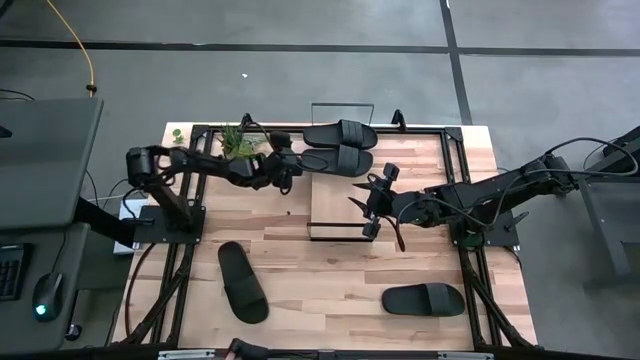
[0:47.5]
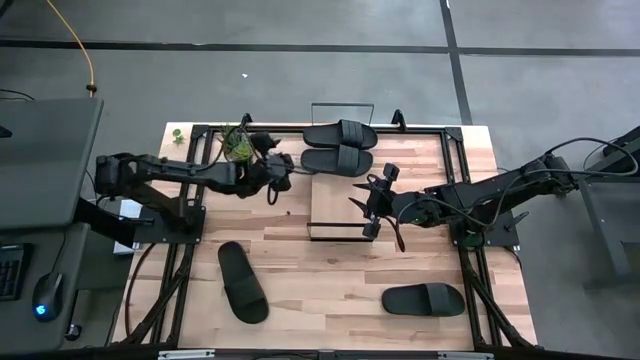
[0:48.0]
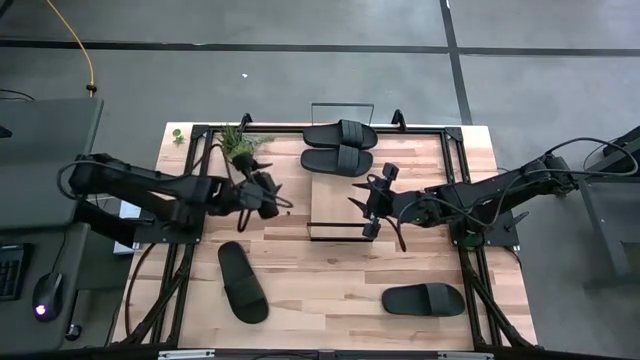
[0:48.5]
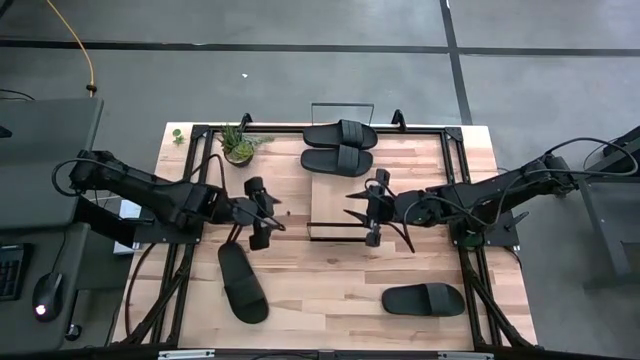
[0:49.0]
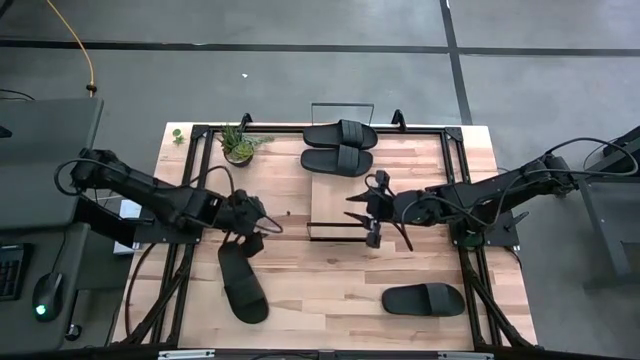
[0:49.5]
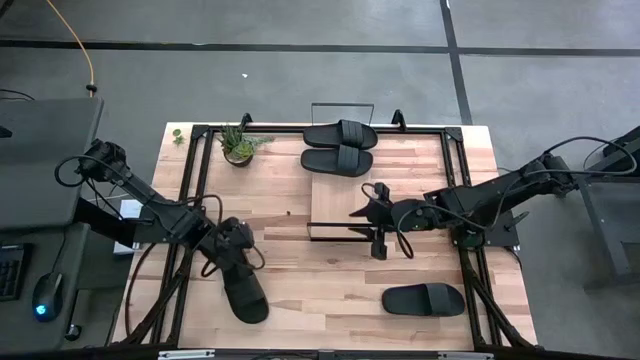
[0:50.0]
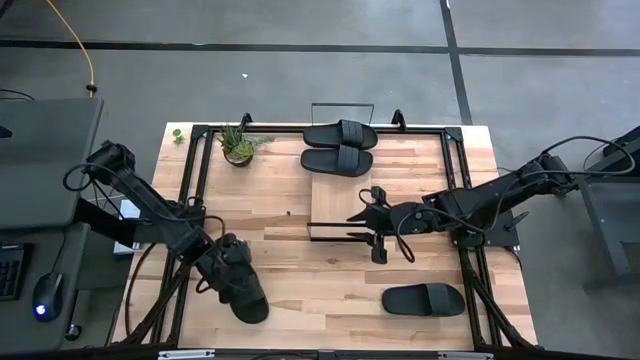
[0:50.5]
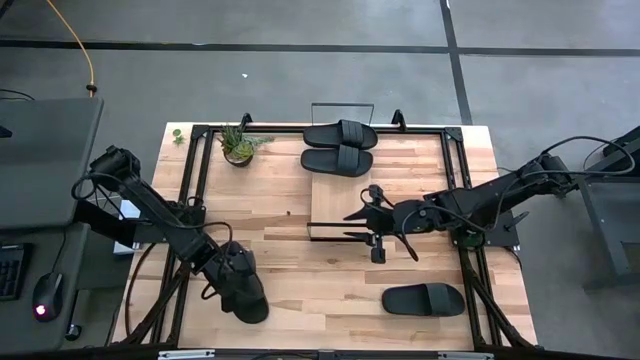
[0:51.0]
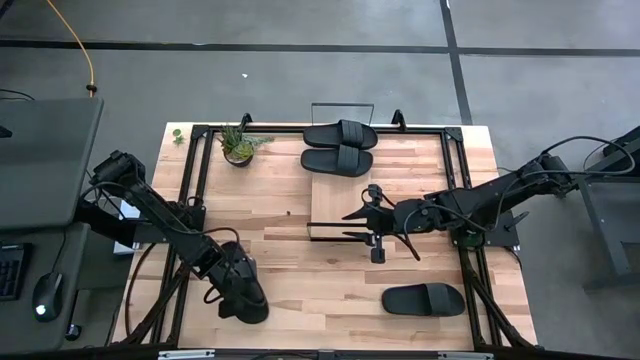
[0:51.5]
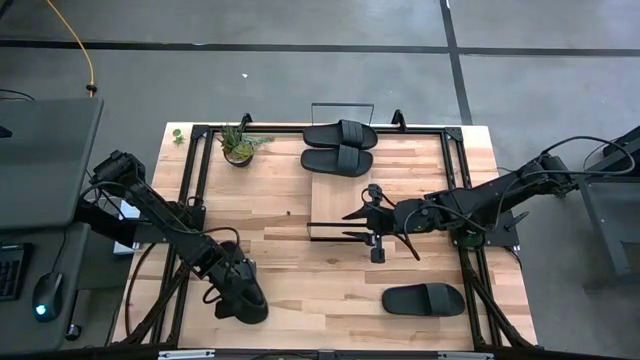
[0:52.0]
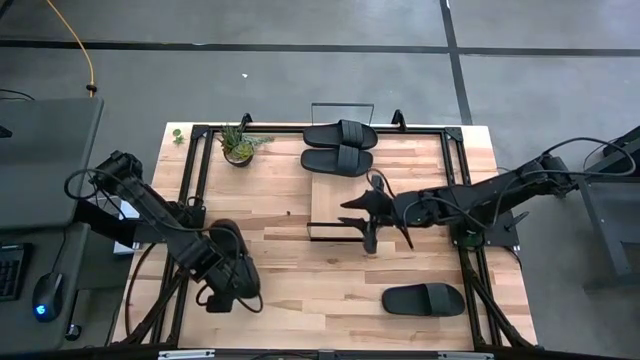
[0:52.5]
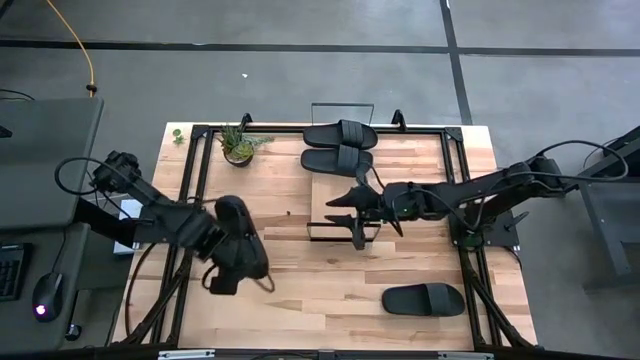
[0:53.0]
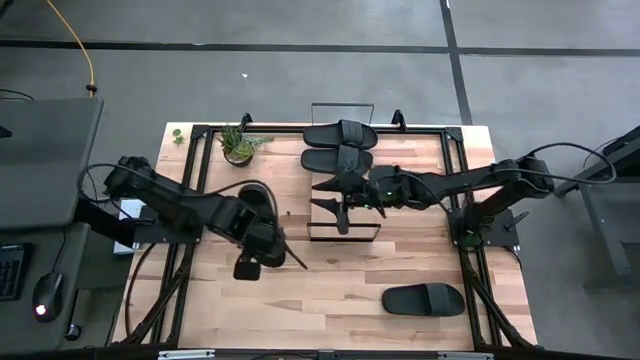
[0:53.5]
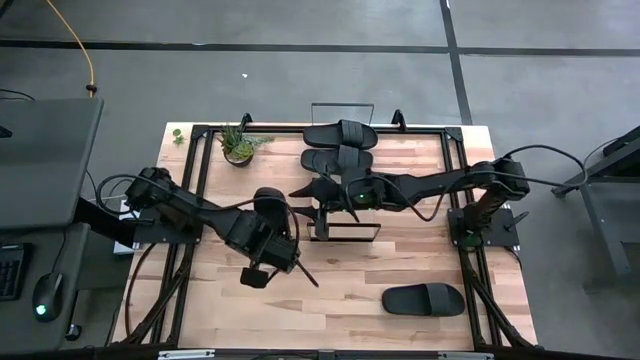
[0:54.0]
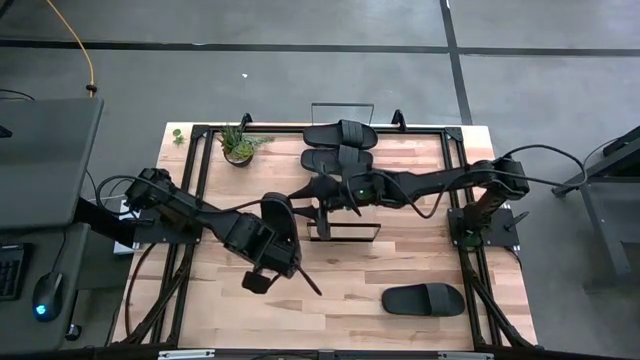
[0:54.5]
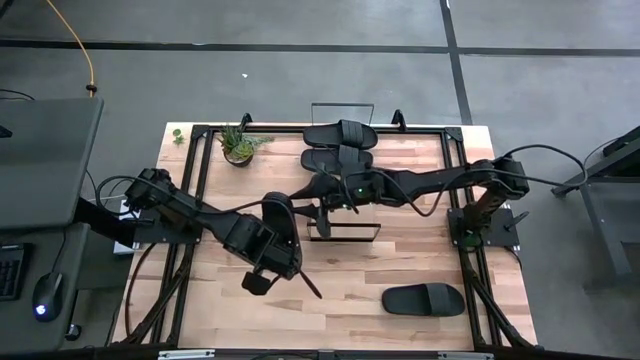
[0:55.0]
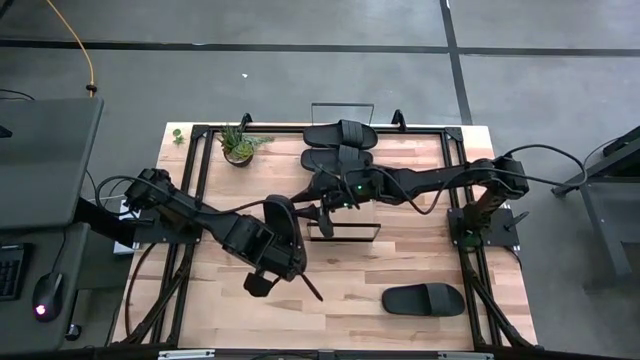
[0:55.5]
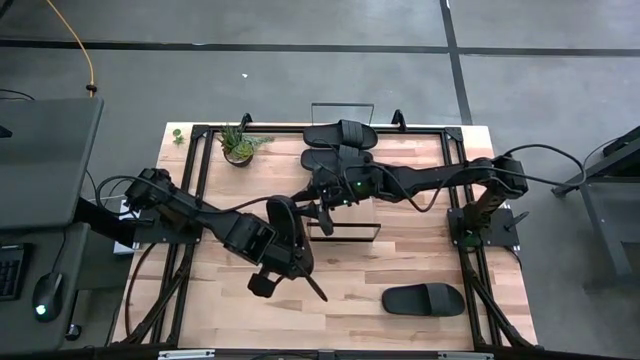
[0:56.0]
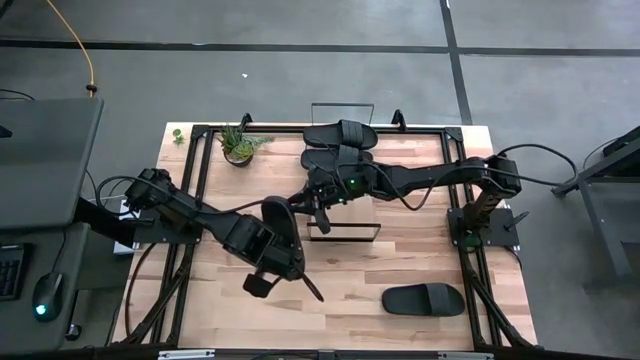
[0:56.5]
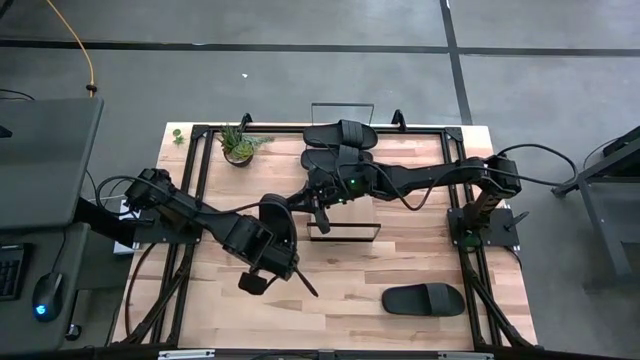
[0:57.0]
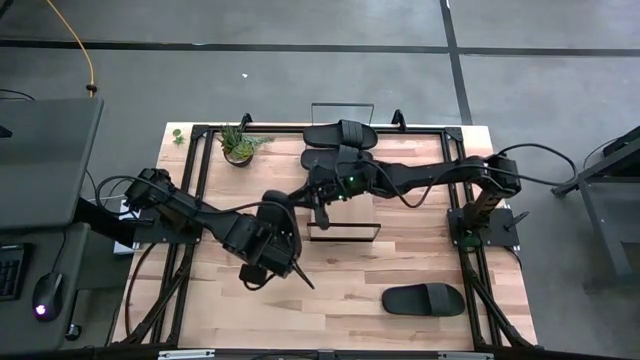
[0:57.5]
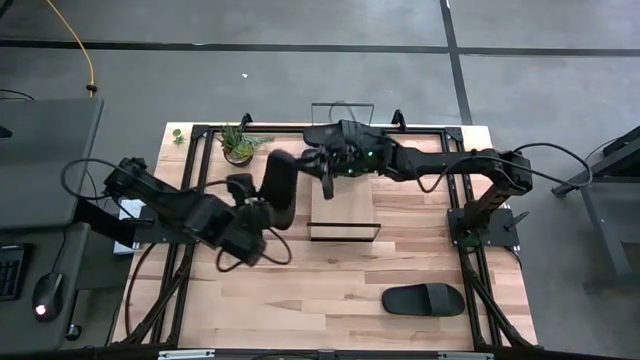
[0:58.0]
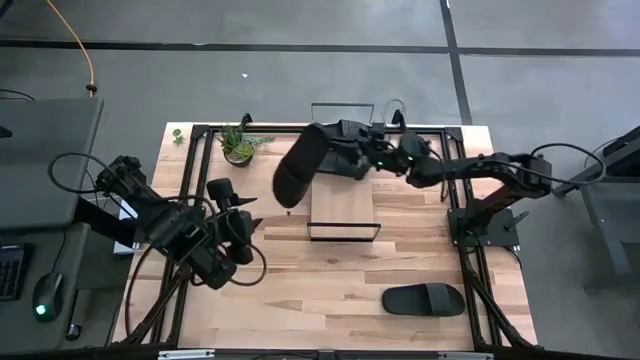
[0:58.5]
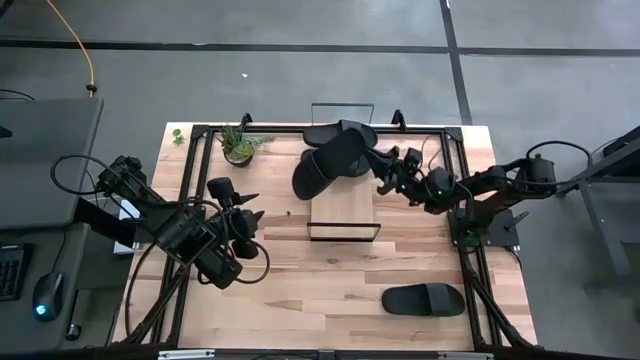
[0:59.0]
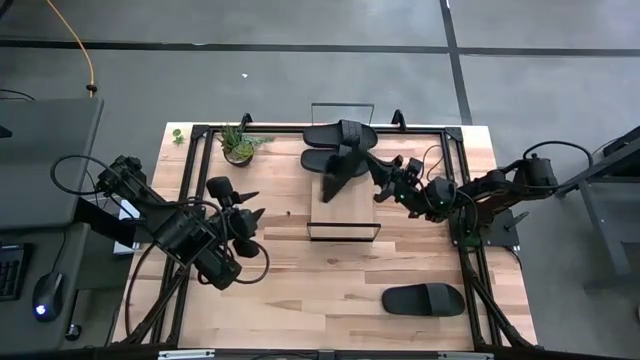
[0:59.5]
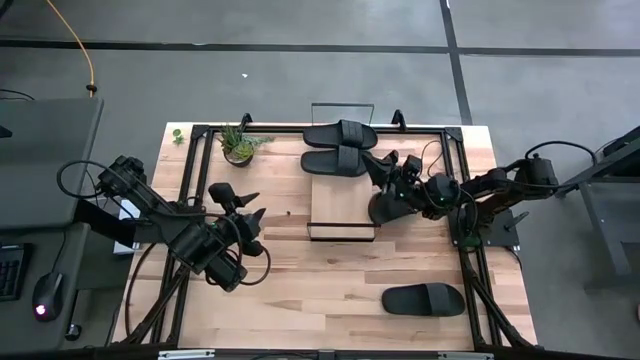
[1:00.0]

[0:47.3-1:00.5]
Task: Pick and place slides into the shelf
Put the left black slide on the shelf

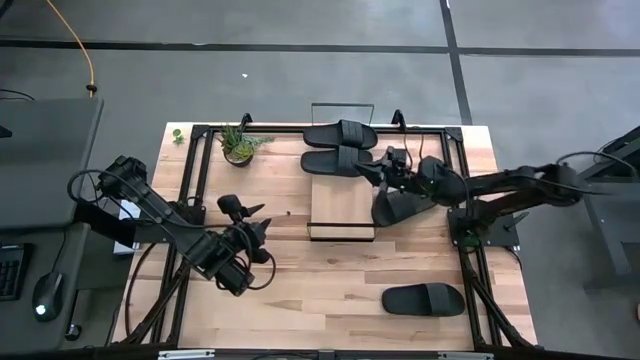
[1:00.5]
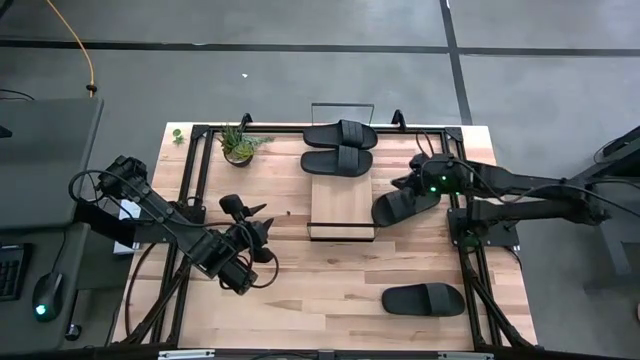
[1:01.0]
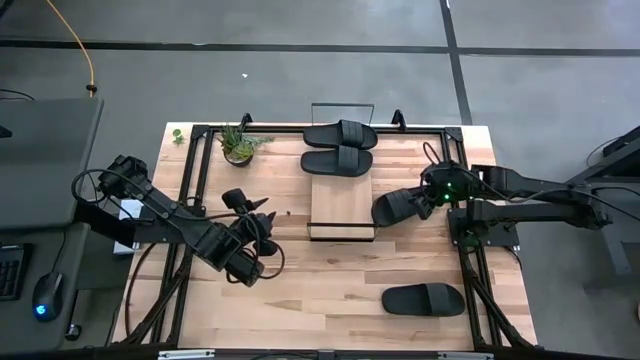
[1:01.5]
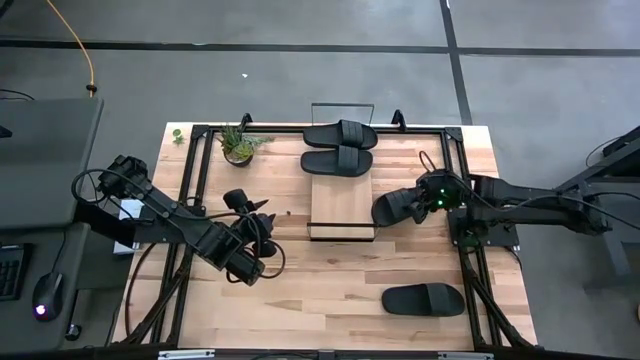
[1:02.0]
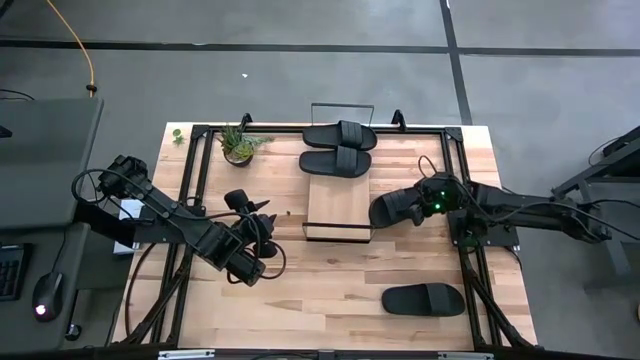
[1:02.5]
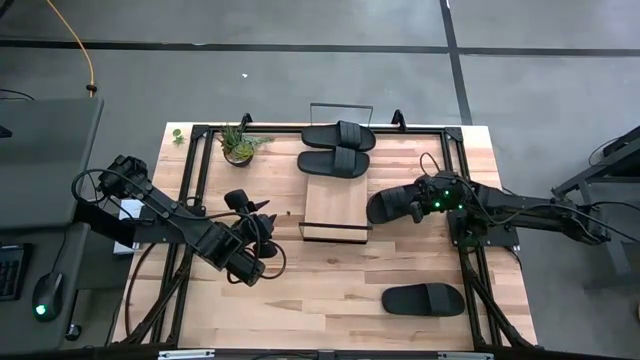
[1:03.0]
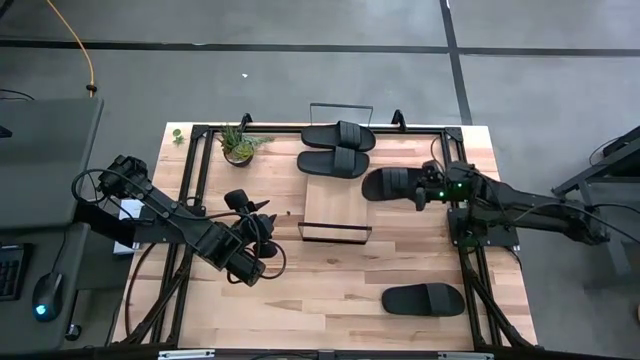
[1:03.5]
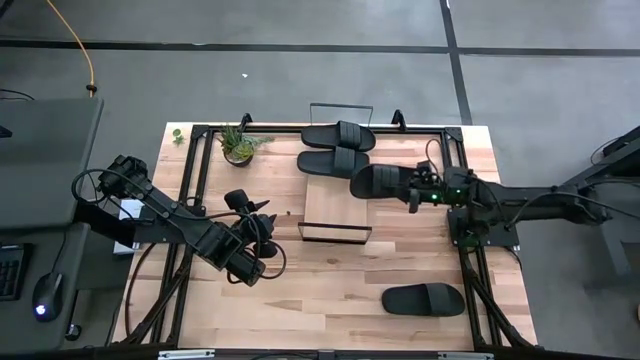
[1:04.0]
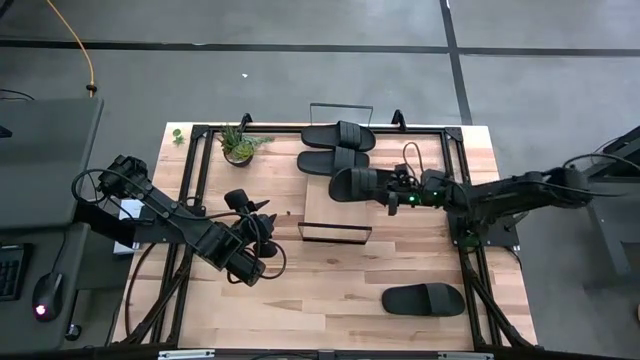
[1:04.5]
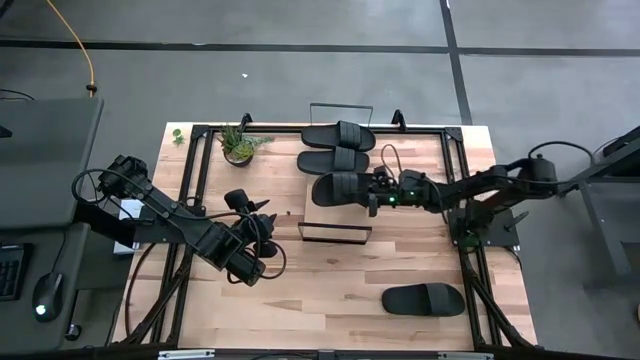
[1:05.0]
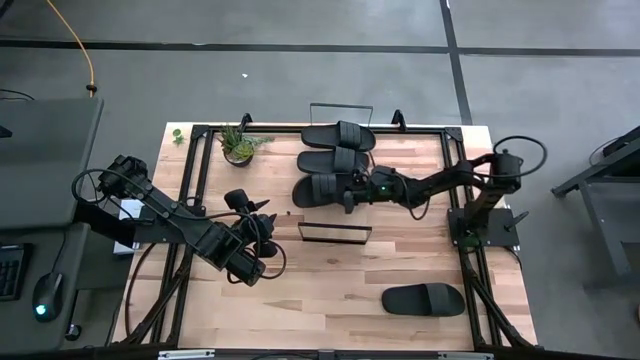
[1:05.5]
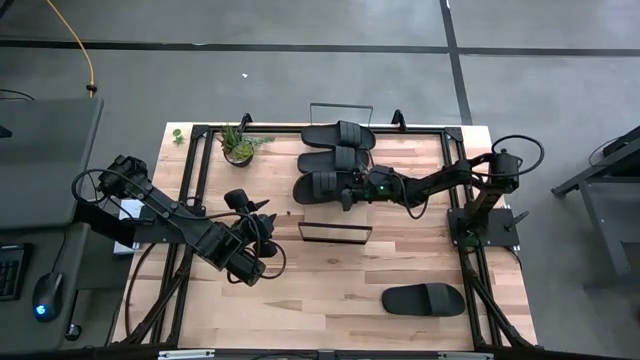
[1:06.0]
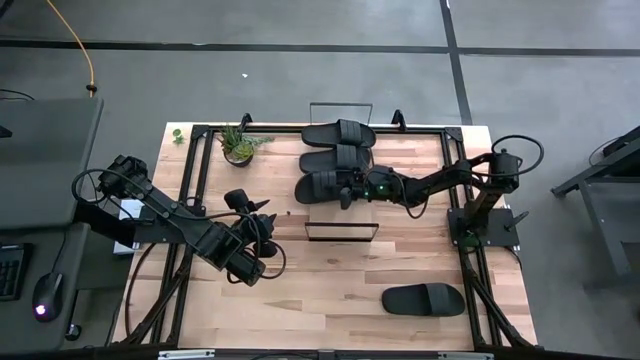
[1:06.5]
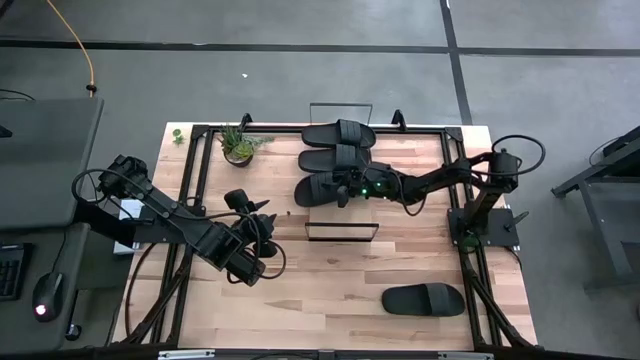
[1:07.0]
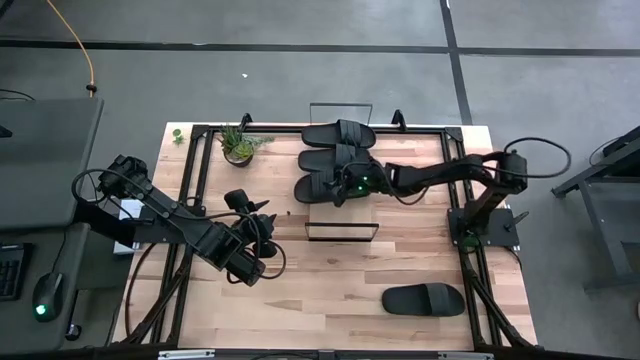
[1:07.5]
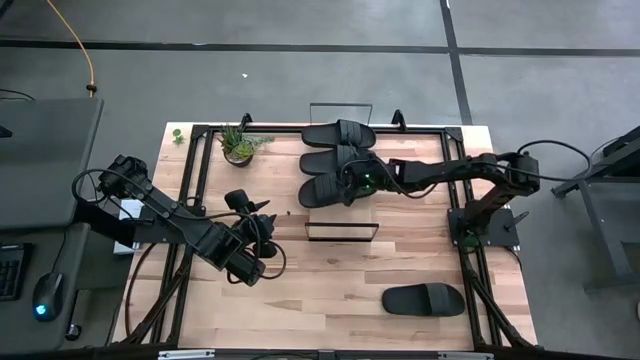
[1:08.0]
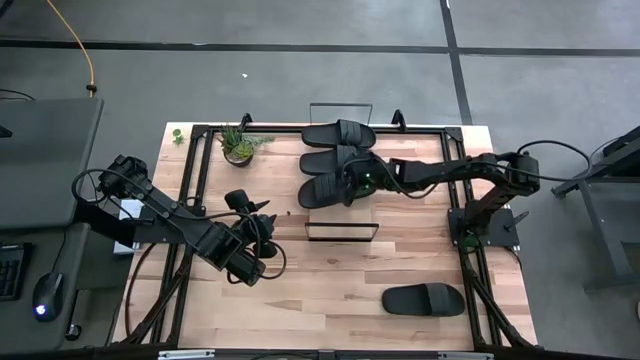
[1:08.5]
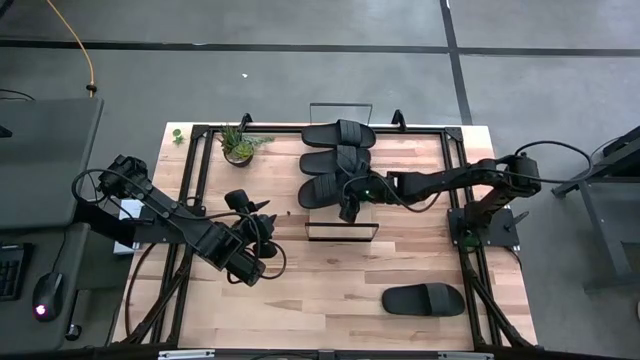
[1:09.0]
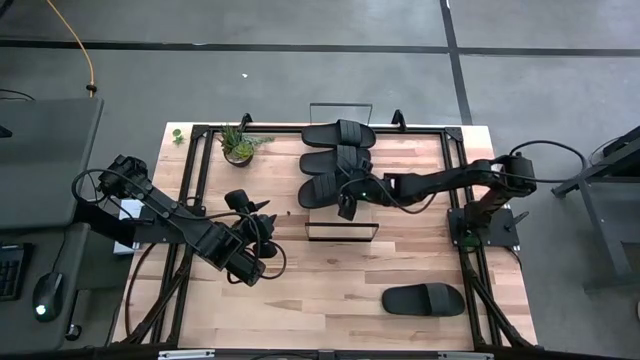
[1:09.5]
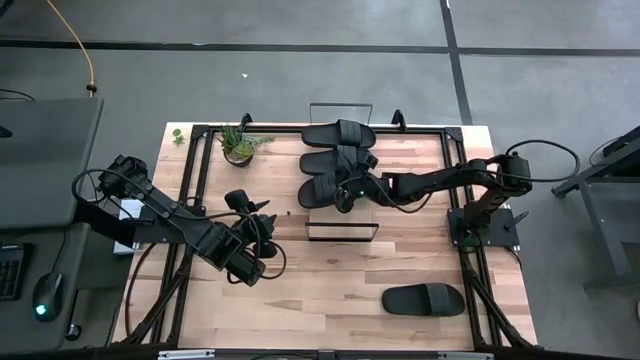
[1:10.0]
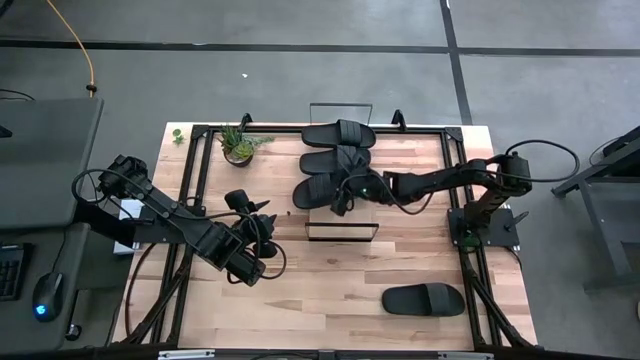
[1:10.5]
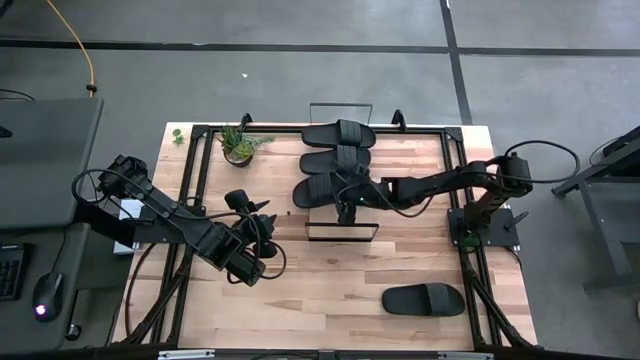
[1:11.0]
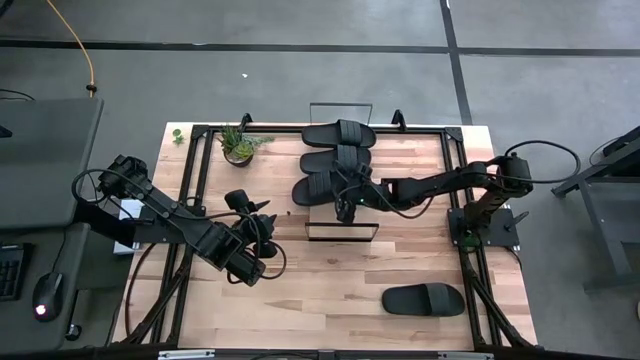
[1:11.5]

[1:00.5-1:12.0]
Put the left black slide on the shelf
